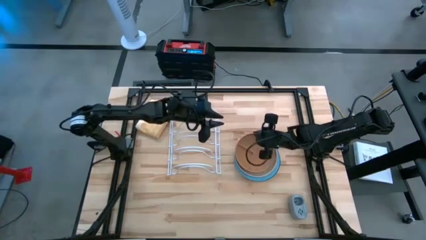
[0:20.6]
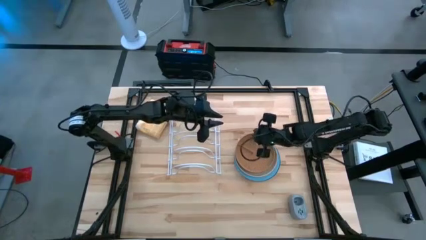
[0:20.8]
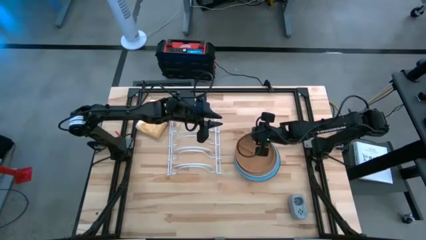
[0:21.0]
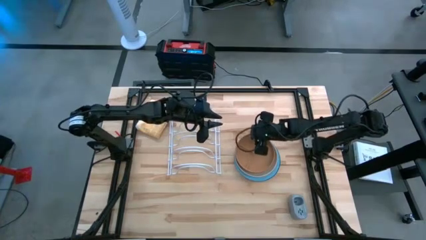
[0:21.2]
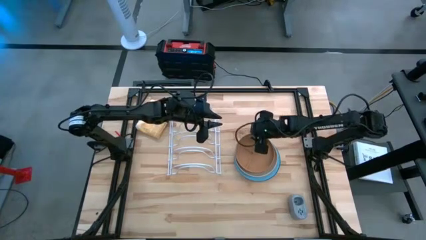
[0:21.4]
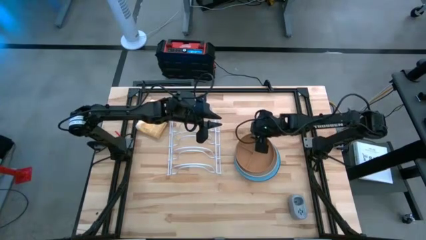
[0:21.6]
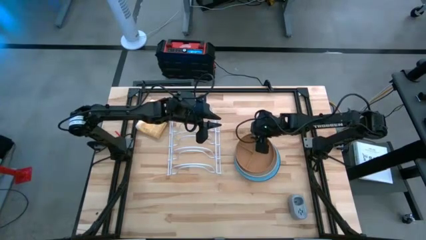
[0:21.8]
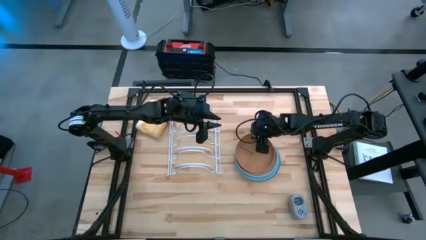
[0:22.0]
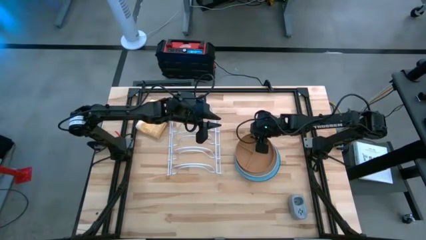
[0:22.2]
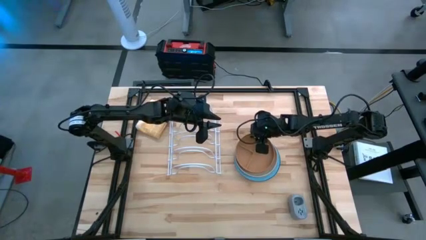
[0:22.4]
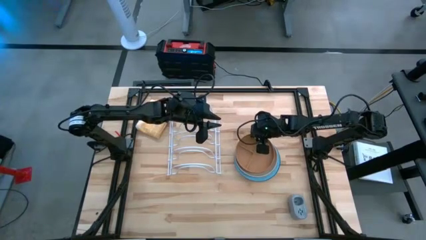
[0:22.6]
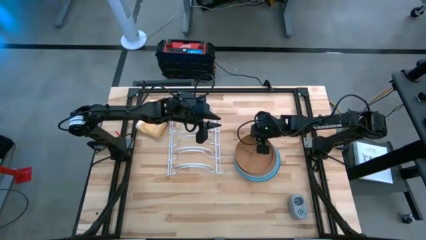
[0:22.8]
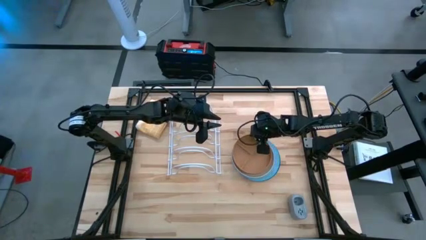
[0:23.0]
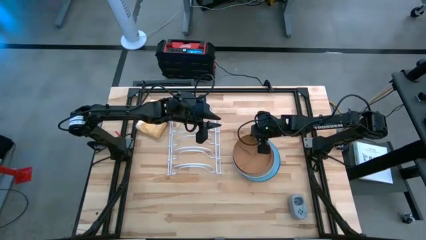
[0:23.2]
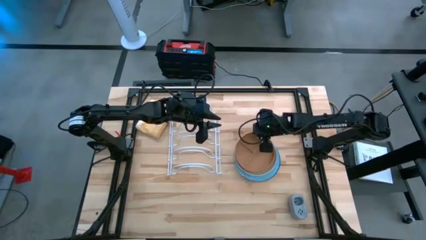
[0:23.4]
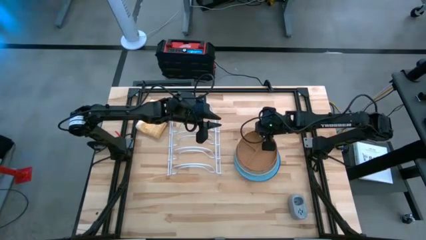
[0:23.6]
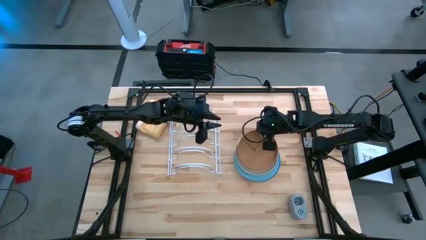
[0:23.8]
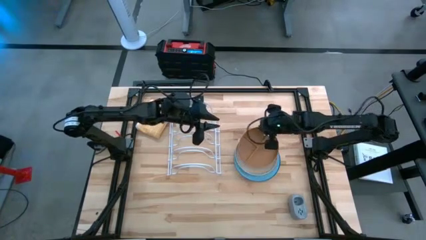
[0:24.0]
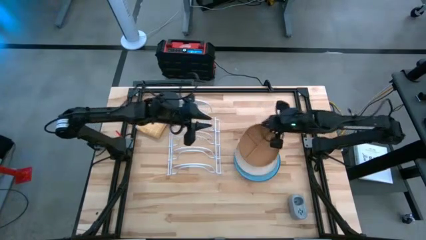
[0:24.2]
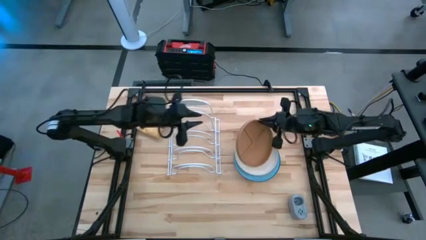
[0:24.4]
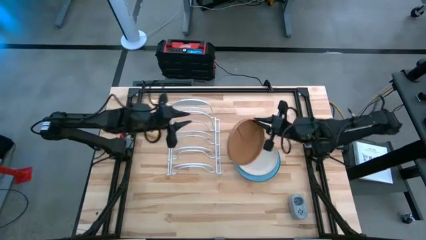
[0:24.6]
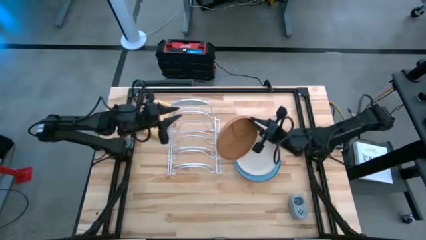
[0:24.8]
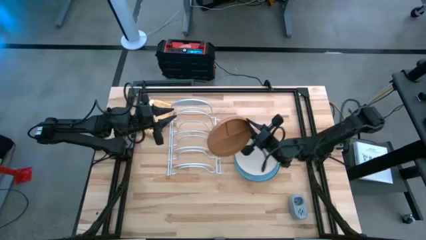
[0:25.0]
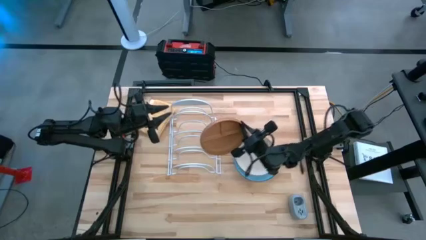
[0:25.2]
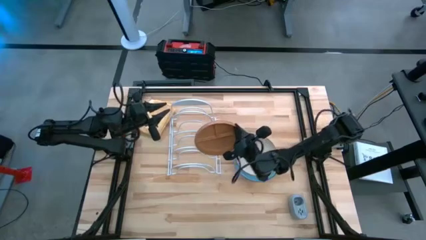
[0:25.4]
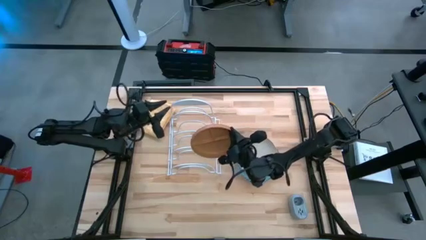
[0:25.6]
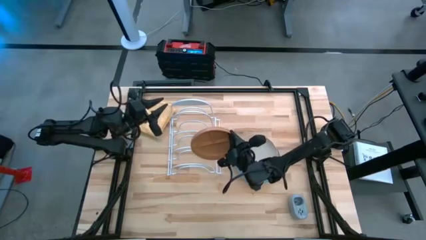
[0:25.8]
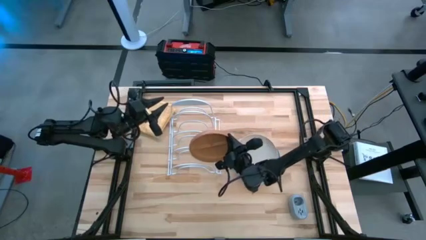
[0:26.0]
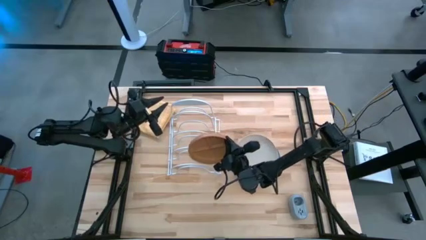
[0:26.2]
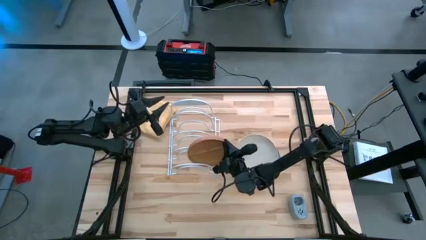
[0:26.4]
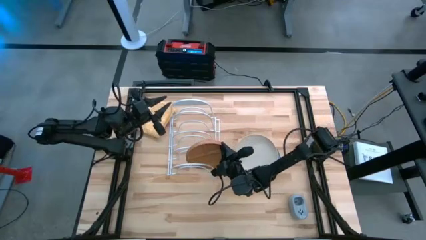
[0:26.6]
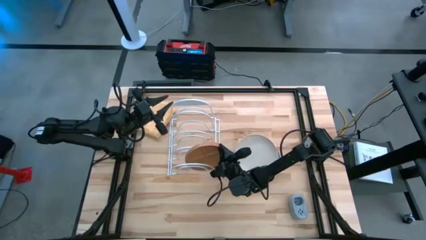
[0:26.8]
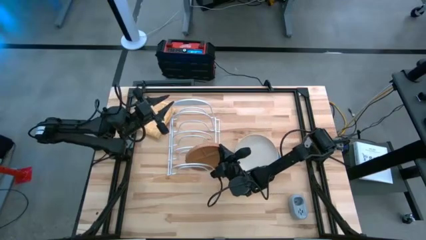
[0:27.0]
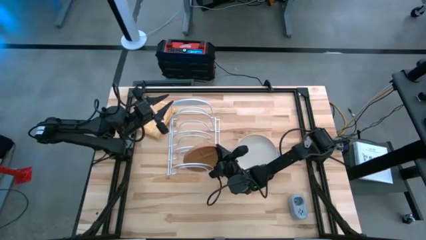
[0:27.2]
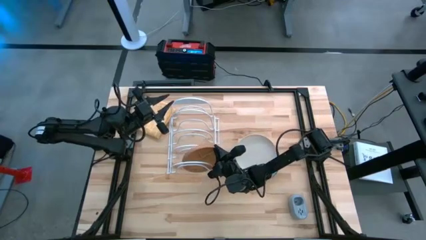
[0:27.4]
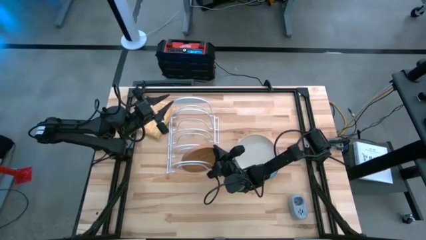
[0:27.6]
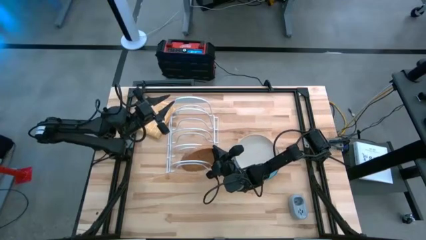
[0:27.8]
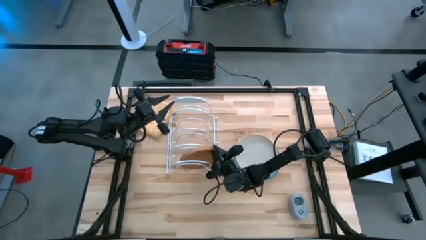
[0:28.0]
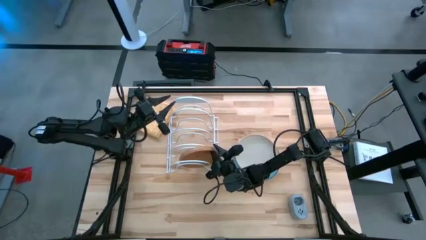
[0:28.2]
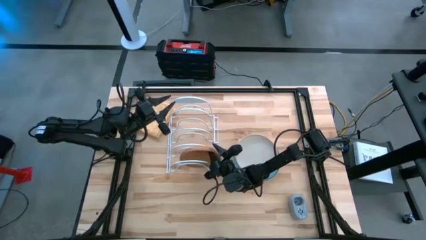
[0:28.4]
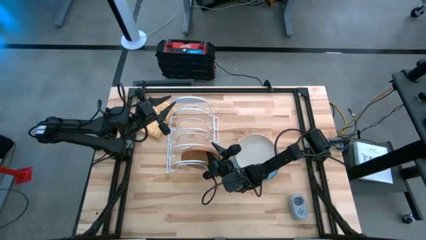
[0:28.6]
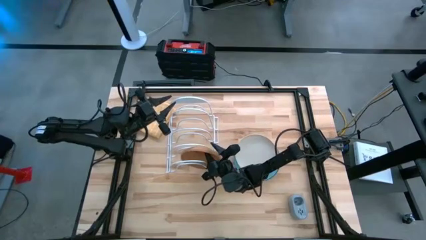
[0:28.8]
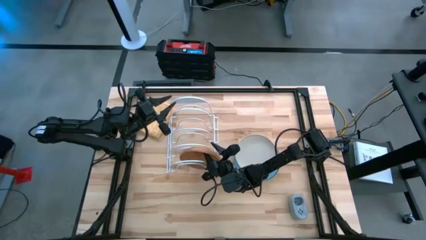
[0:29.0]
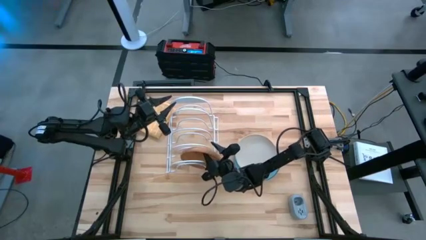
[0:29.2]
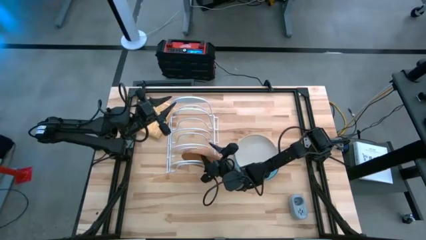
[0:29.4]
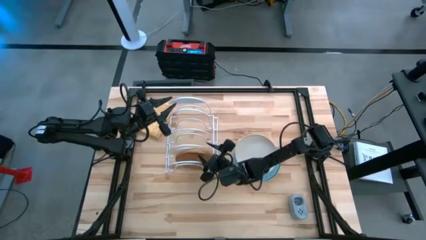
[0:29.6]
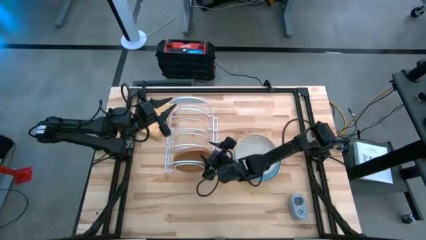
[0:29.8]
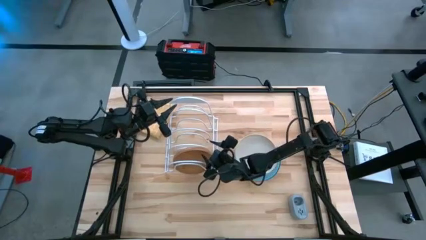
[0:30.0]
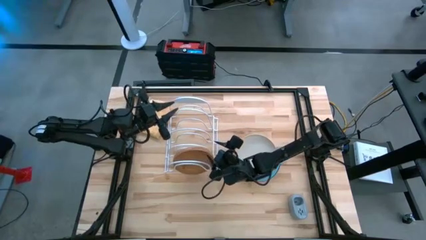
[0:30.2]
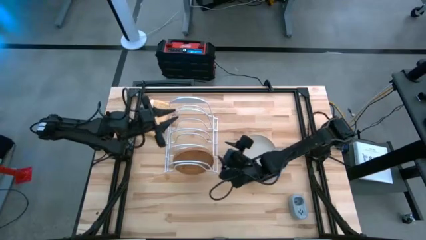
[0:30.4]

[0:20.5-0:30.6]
Task: Sort dishes
Put the brown plate into the dishwasher rack

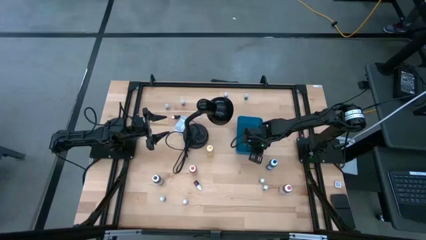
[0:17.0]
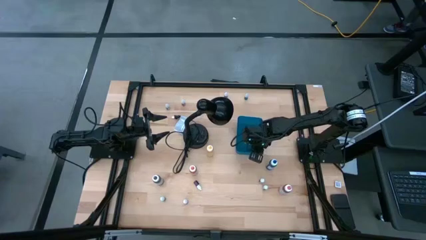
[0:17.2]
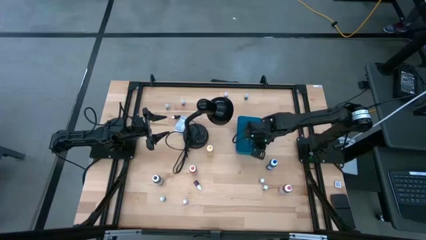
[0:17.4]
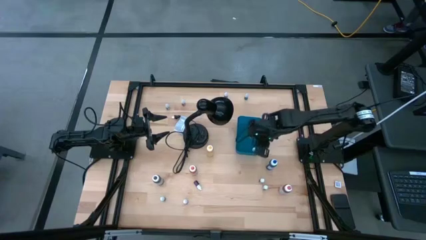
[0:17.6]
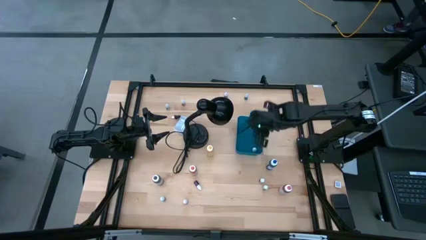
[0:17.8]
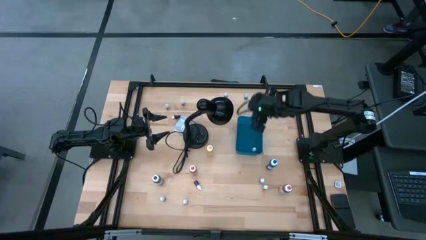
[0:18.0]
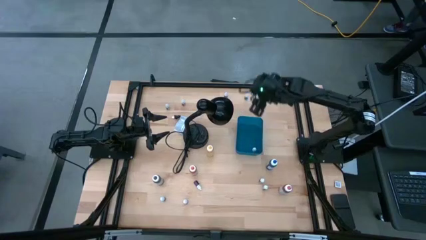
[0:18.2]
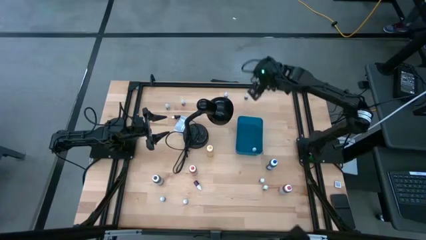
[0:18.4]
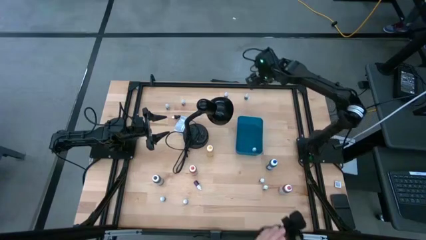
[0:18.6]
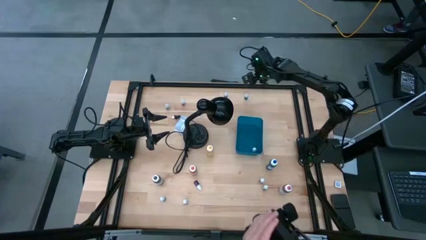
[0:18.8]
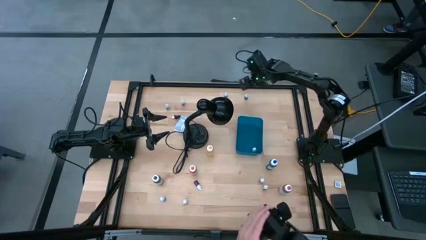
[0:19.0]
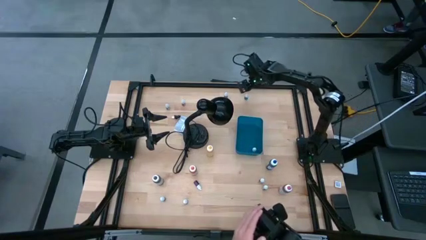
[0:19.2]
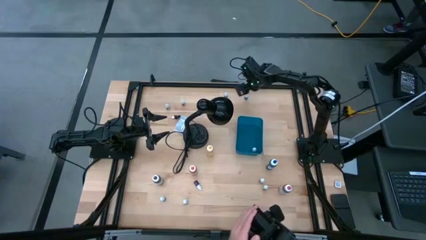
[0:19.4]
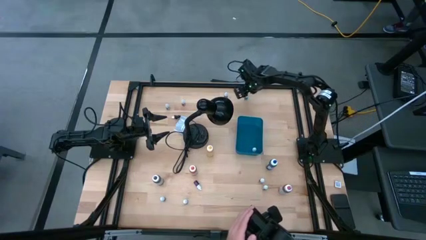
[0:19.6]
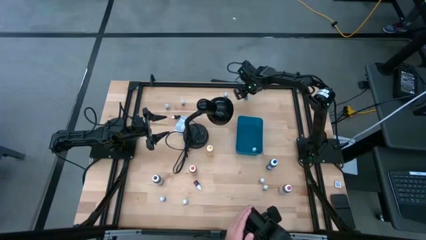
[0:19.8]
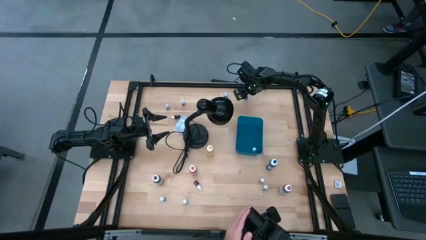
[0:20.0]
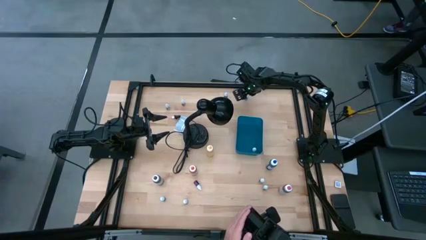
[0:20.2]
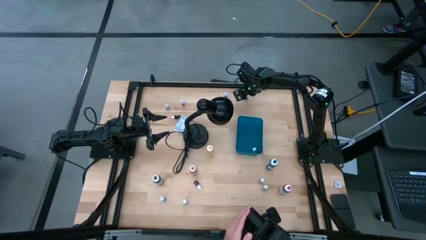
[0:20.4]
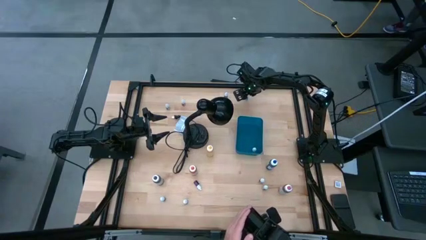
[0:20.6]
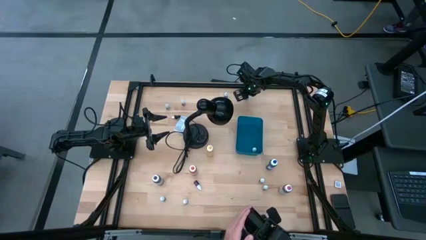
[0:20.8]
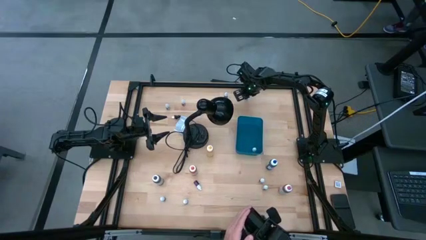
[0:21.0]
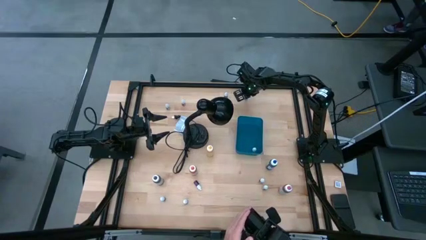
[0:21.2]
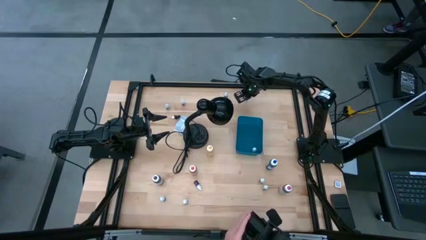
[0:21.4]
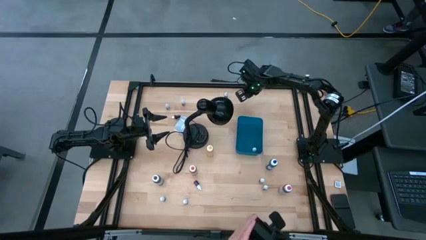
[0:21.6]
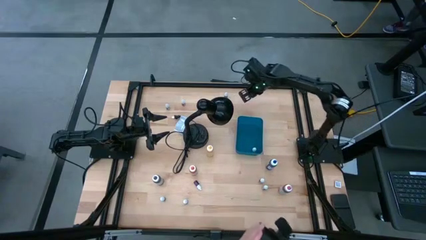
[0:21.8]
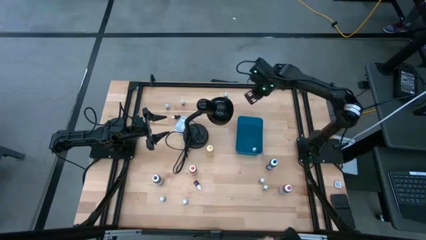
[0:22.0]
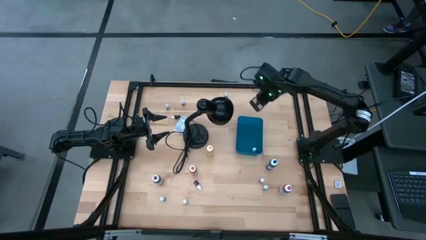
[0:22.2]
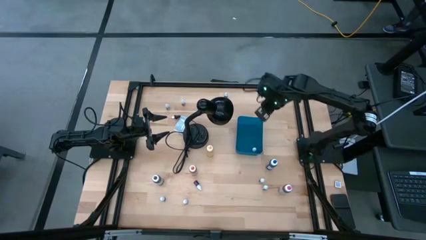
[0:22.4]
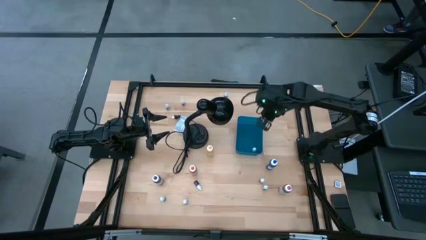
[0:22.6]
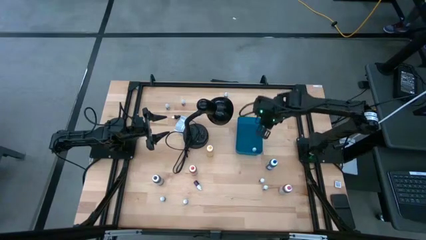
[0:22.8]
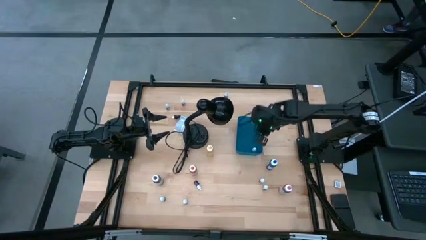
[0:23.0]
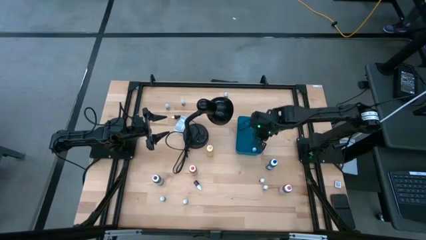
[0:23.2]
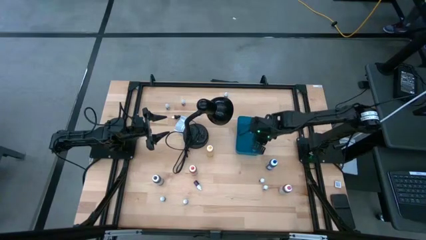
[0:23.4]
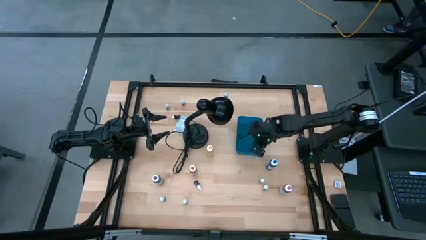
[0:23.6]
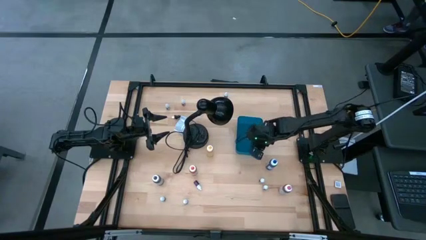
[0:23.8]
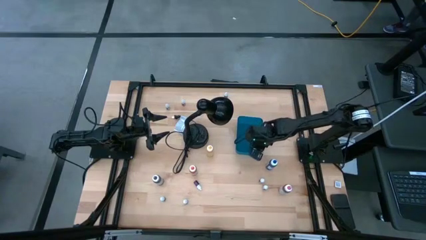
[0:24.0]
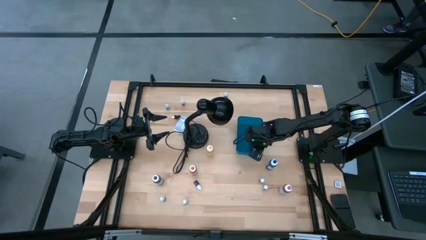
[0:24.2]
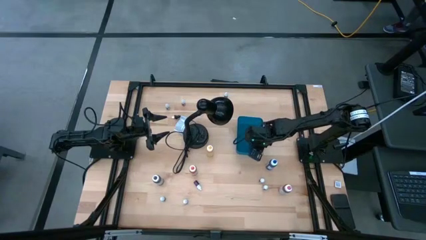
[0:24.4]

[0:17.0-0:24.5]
Task: Pick & Place food coloring
Put the small blue food coloring bottle into the blue bin
